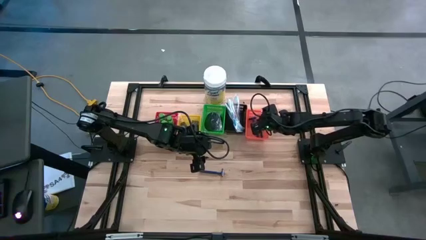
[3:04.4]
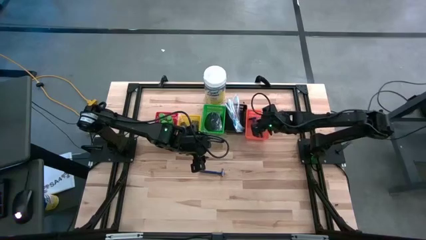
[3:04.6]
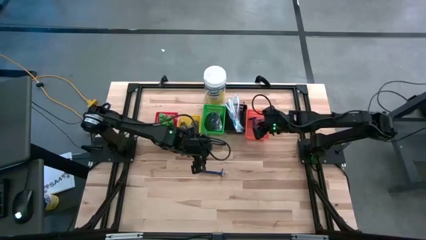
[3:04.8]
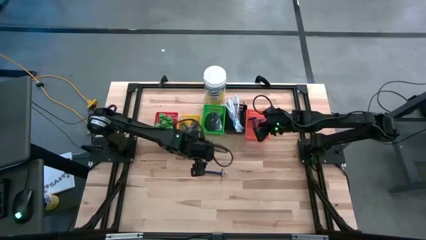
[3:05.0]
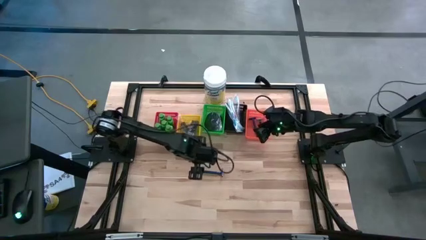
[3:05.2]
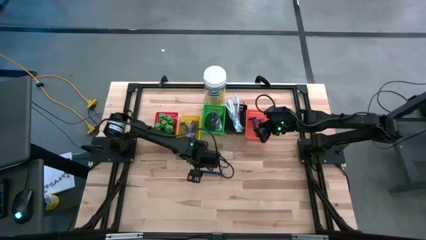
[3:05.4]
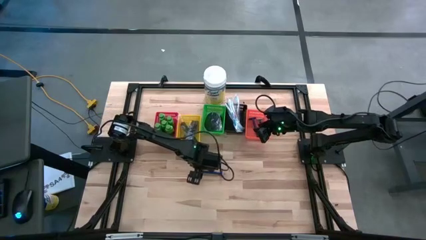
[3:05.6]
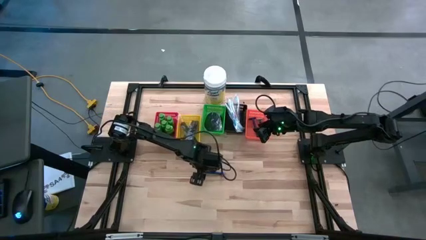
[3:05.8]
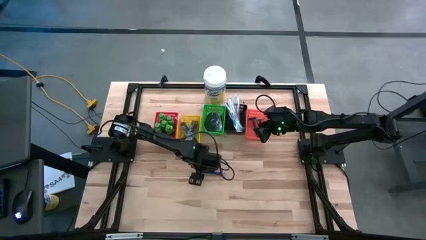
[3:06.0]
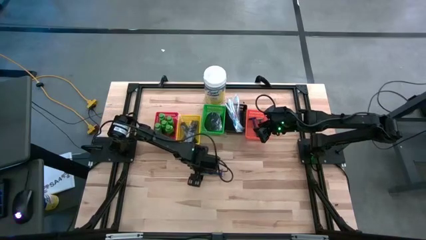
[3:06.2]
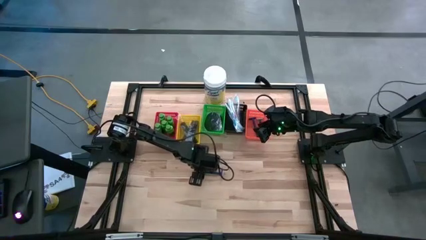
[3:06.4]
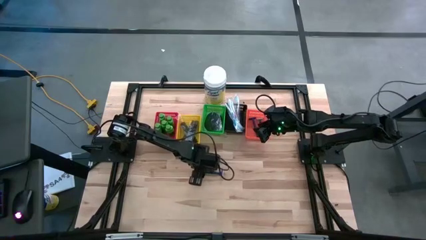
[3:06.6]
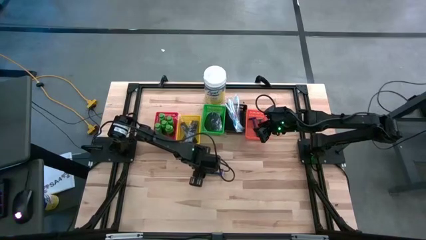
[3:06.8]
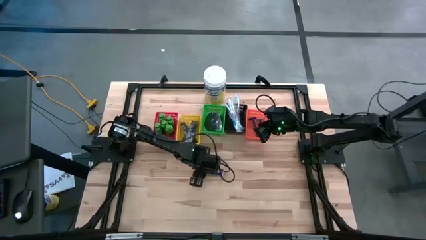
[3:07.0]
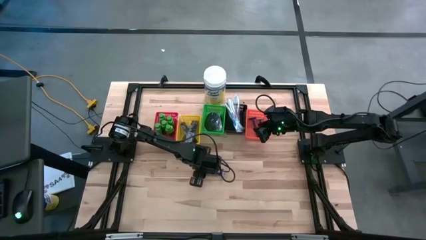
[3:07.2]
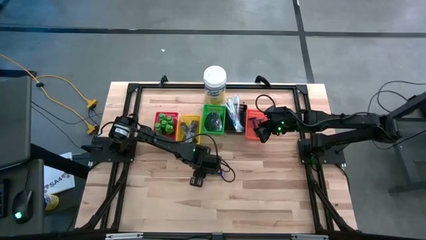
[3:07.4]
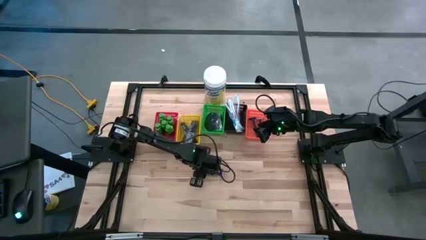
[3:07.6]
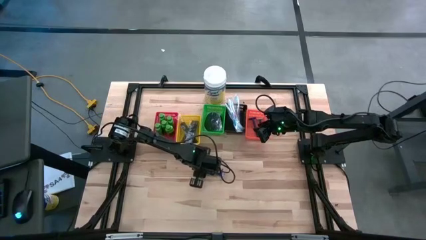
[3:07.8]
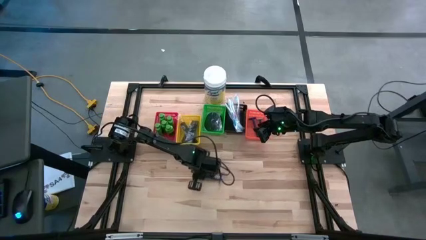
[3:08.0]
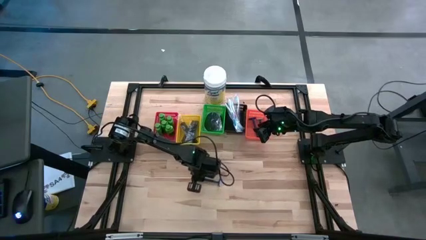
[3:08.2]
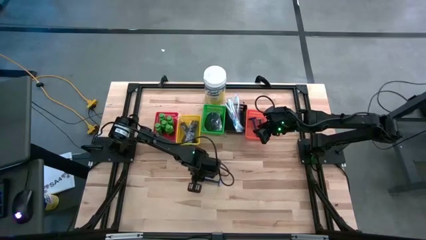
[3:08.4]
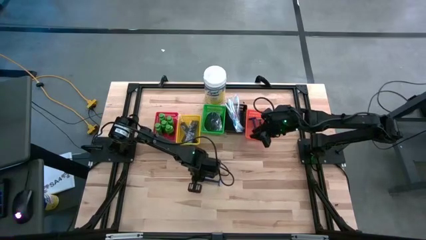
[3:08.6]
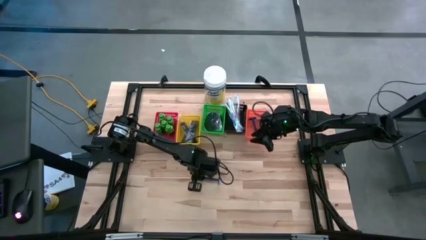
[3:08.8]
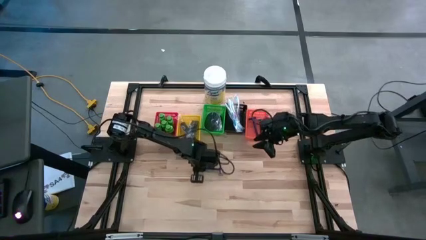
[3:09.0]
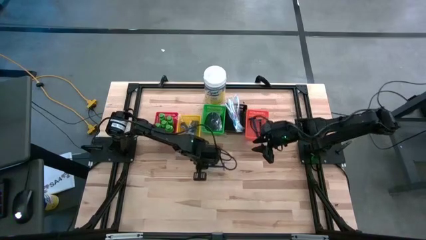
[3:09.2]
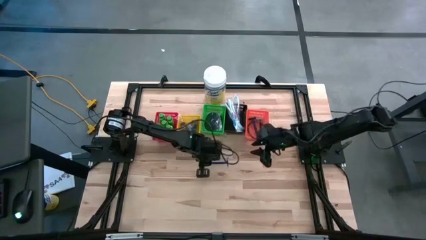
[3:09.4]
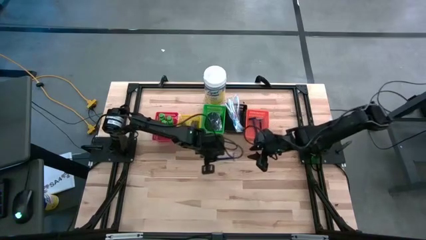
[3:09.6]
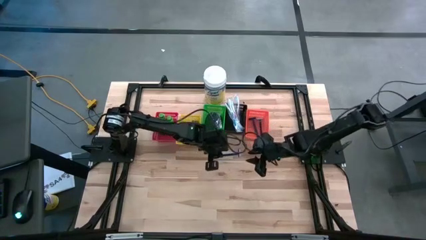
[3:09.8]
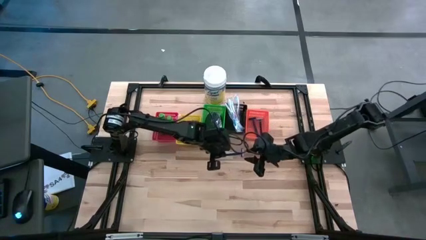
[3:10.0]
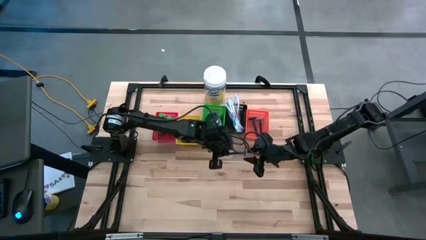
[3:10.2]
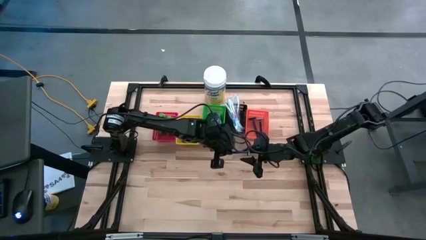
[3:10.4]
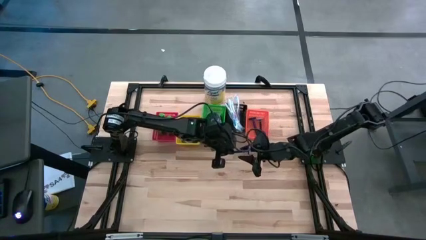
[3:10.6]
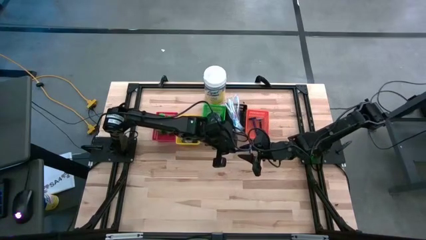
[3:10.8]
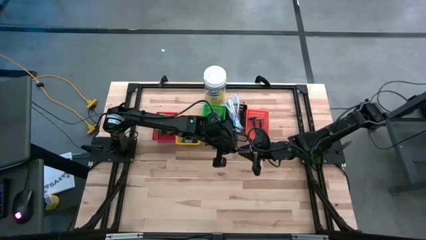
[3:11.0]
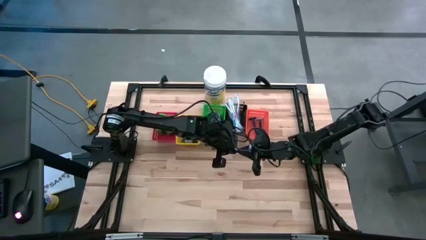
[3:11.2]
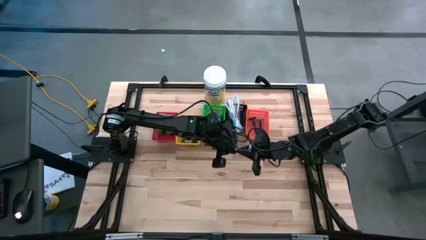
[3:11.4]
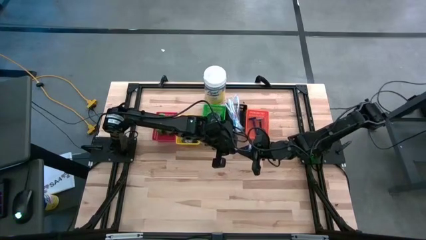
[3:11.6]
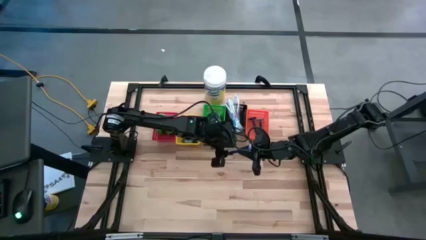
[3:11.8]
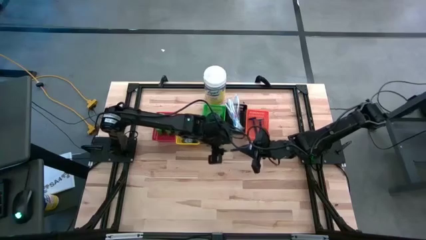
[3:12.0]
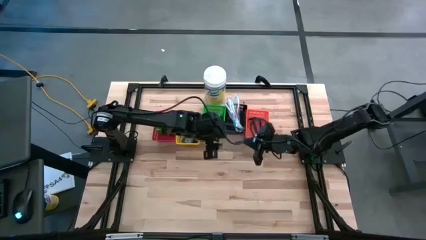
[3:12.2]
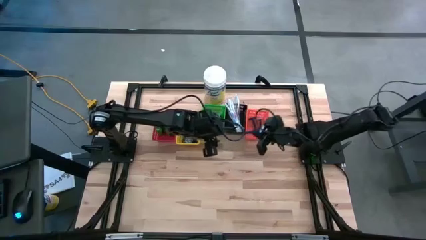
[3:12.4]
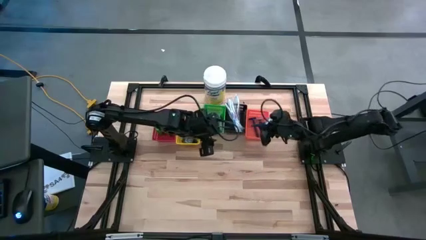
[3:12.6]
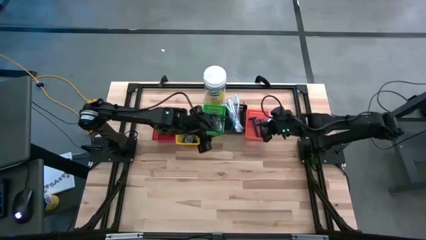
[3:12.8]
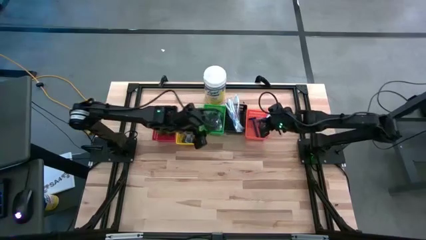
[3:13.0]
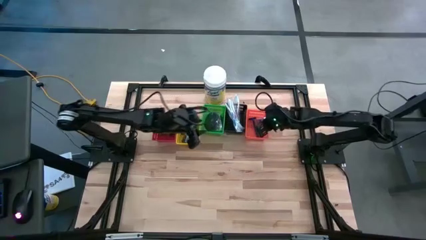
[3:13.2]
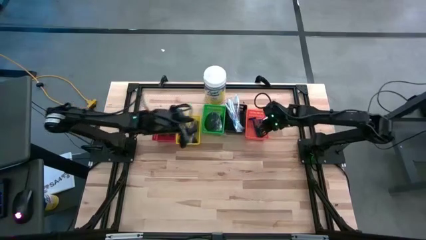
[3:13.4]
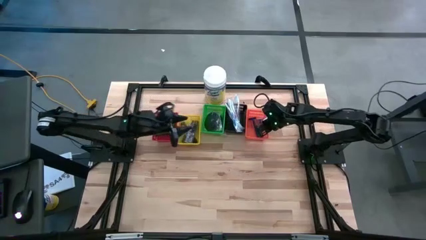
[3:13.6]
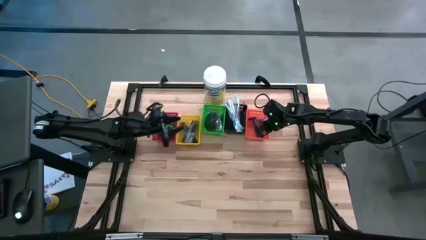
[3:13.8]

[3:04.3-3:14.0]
Task: Pick & Place Travel size toiletries
Put the blue razor into the orange bin

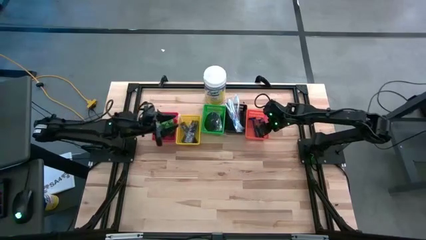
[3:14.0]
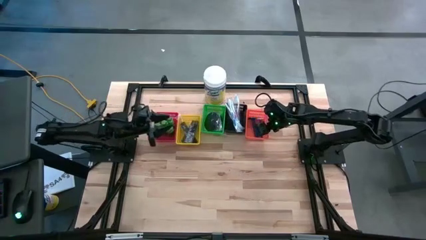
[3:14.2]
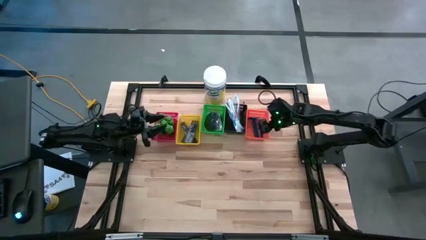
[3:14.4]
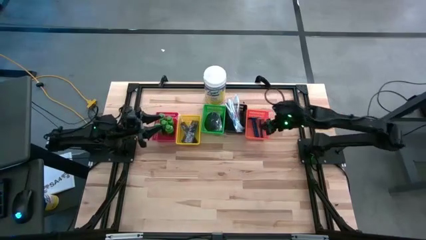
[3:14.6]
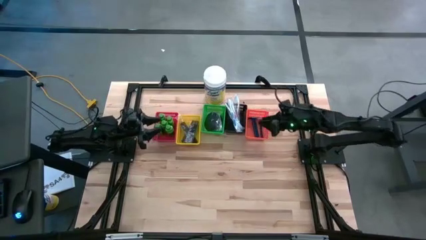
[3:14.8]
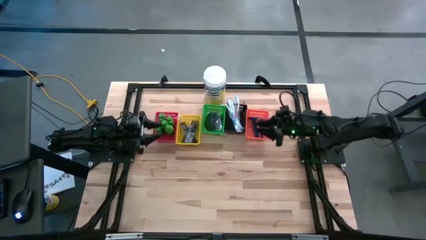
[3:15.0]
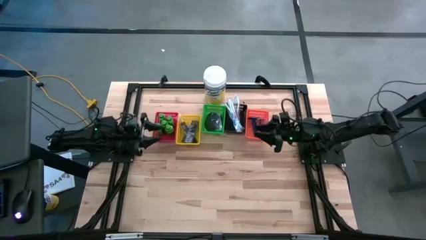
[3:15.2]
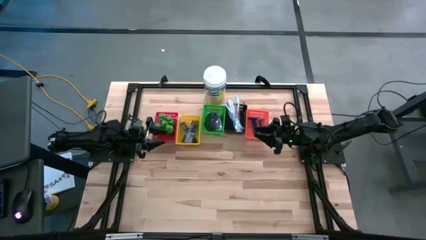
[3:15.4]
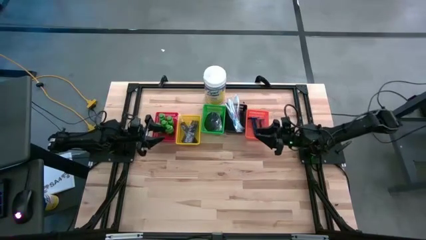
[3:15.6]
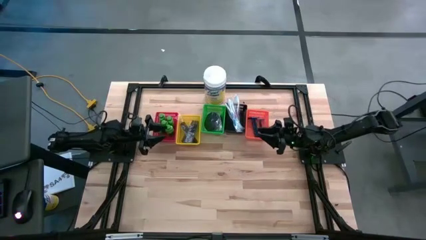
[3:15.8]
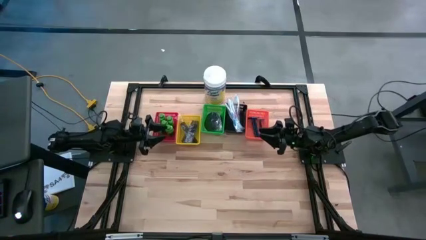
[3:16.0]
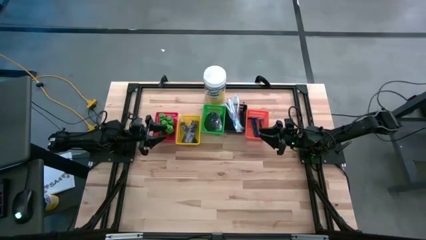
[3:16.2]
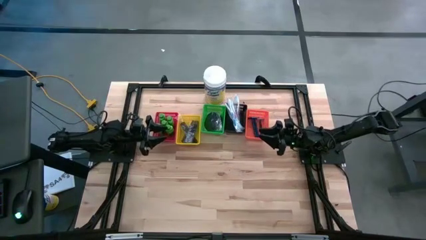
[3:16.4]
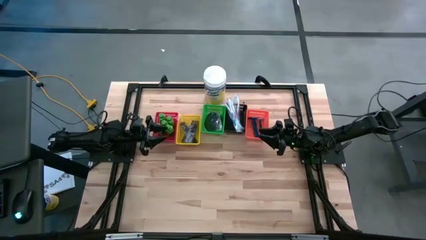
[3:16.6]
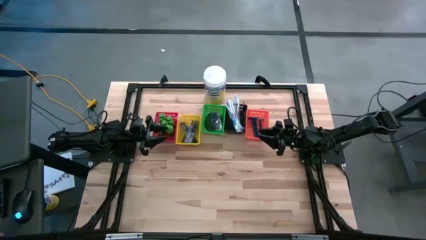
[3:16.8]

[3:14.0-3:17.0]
Return to Home Position

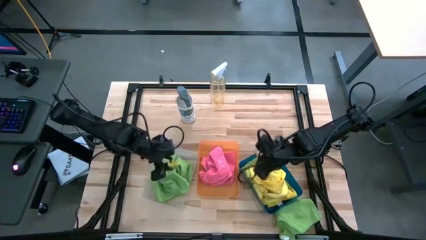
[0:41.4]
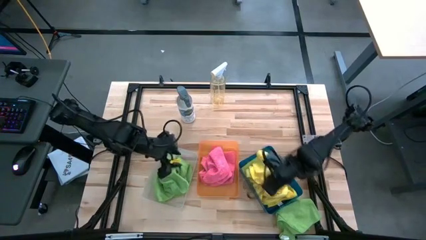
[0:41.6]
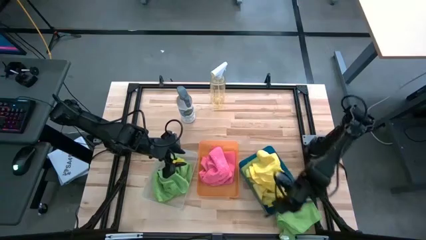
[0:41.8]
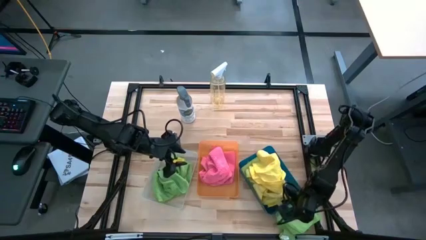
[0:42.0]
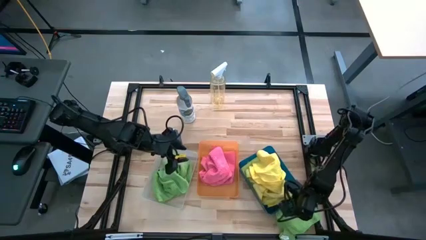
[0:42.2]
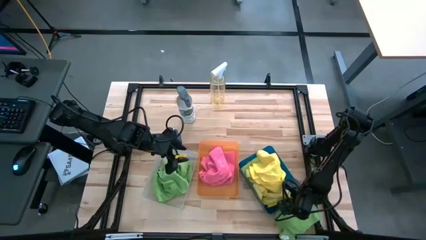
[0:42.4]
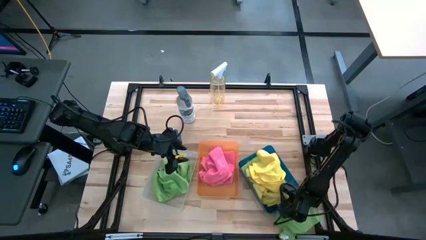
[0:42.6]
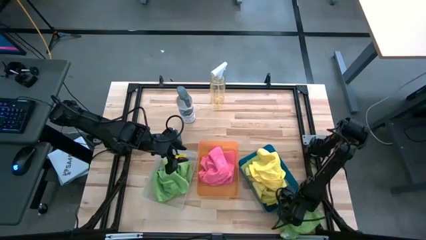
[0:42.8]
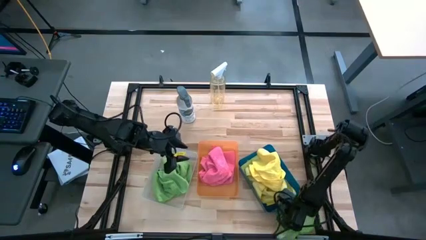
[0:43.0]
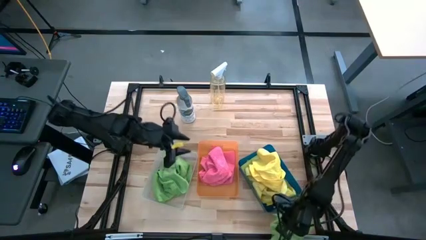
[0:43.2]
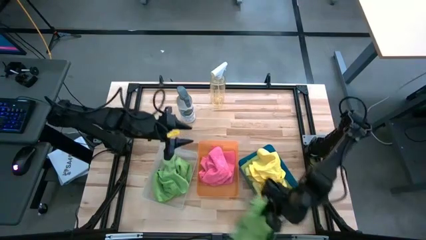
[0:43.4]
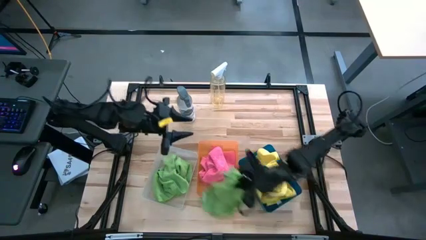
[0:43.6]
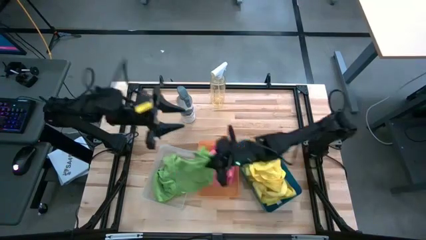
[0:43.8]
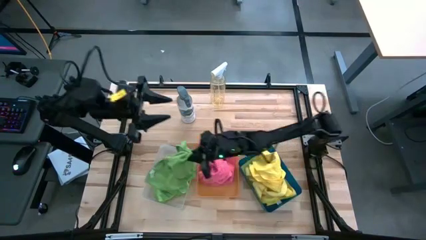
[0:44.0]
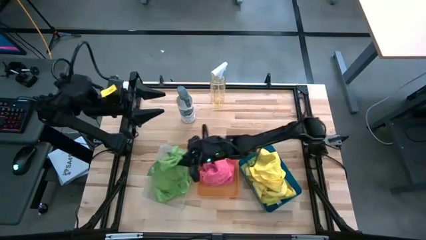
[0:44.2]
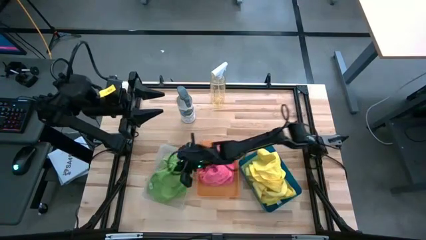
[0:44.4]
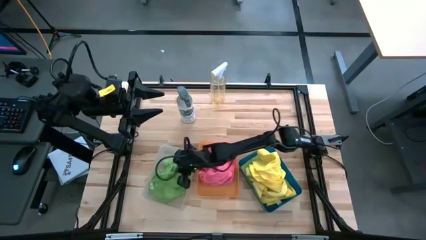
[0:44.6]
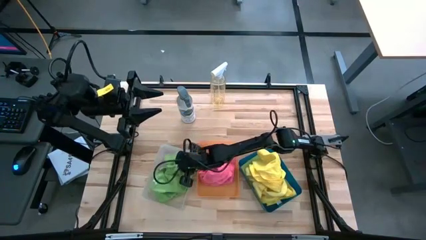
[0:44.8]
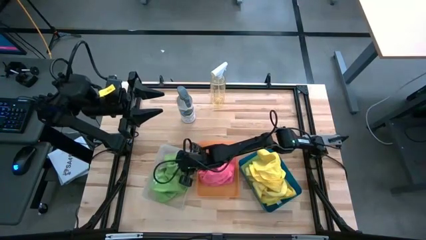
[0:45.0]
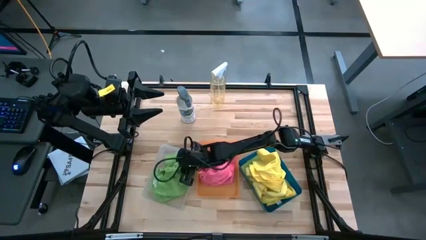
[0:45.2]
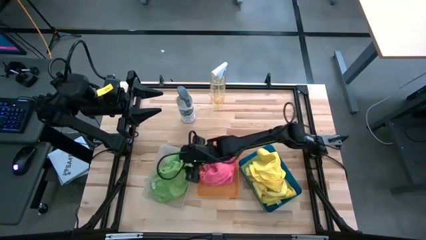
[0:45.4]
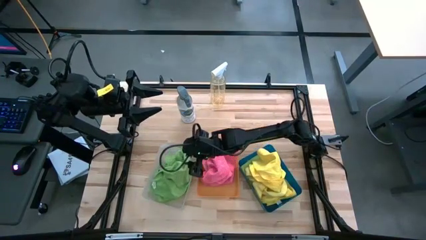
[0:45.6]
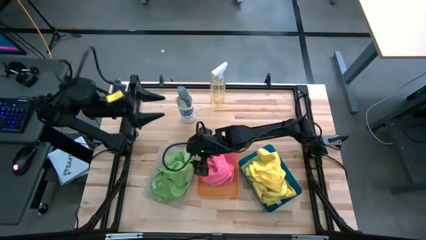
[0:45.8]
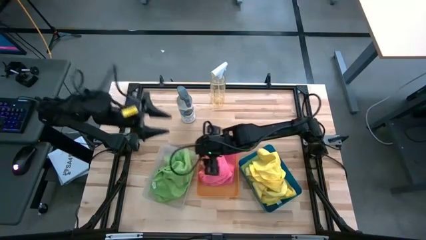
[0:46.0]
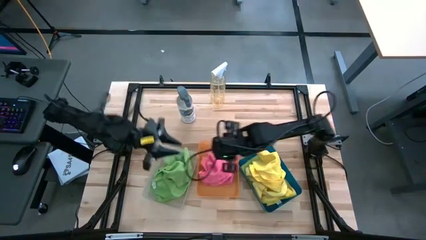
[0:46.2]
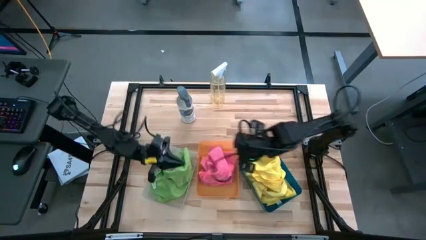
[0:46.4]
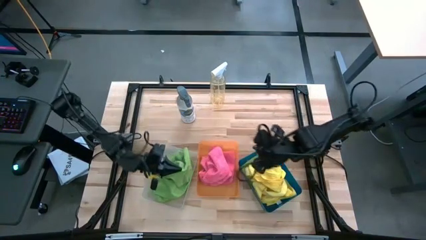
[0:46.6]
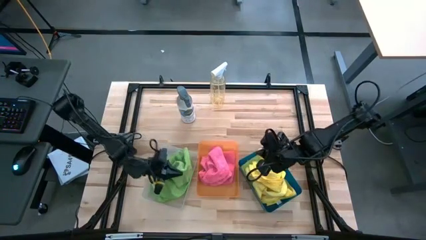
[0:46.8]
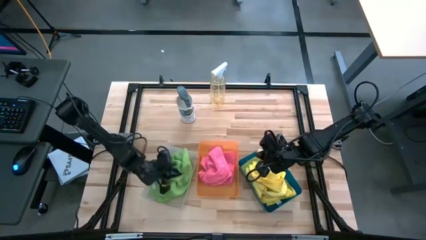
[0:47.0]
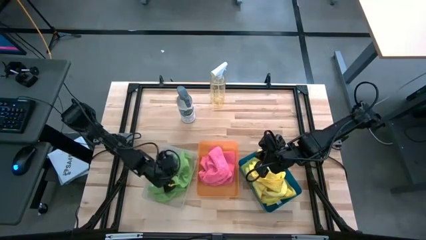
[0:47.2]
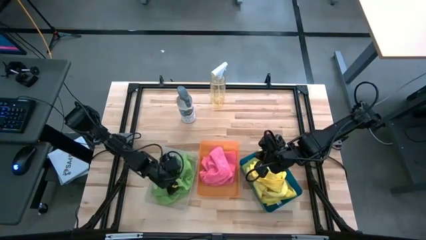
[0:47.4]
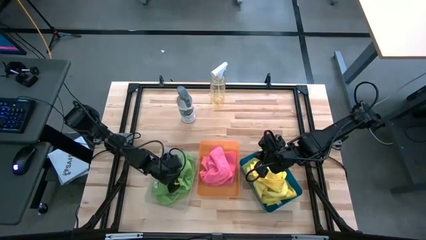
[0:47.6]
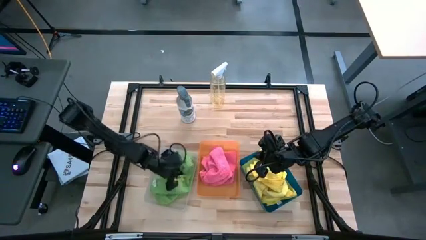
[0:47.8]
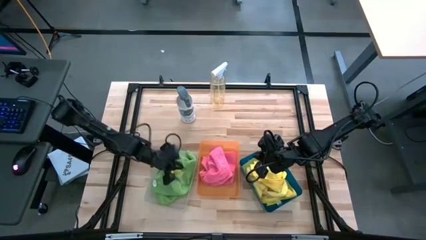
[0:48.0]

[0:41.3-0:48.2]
Task: Sort microfiber towel by color & place in baskets
Put the green microfiber cloth into the transparent bin
